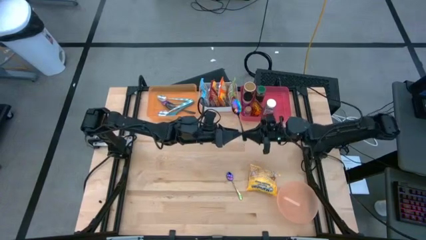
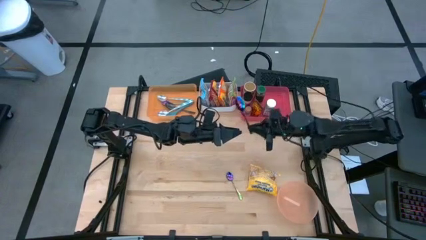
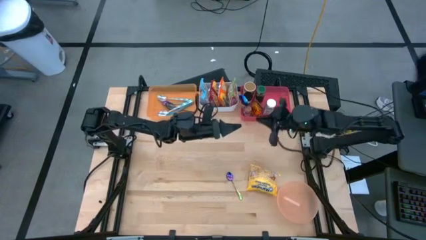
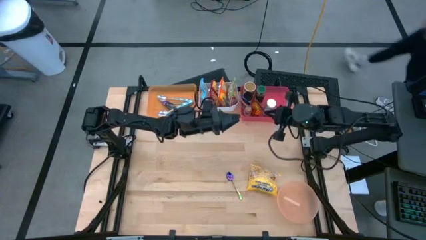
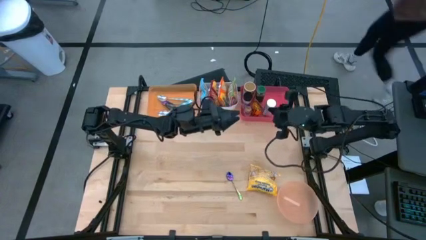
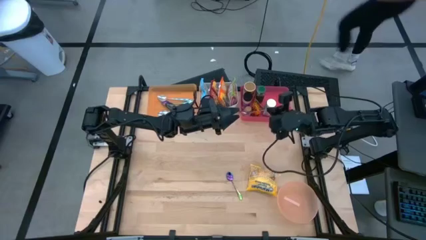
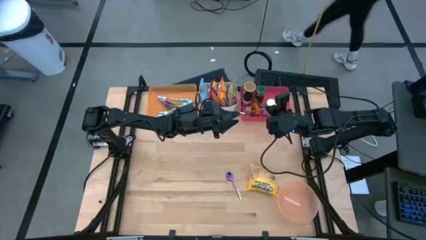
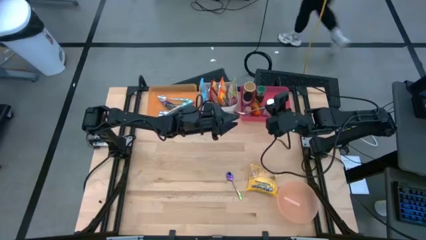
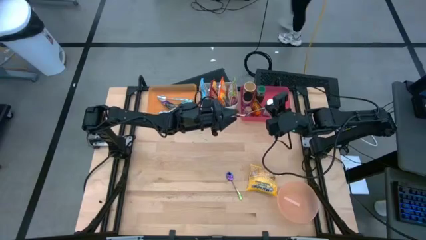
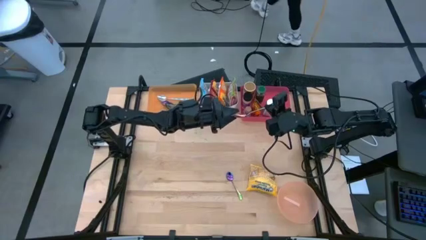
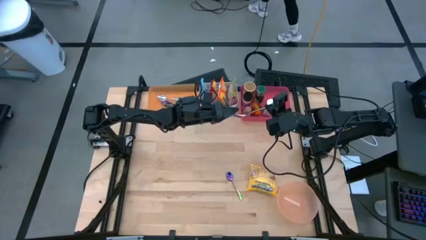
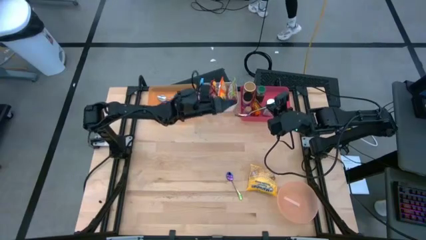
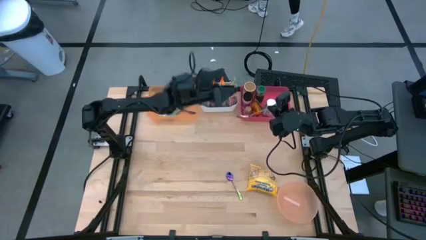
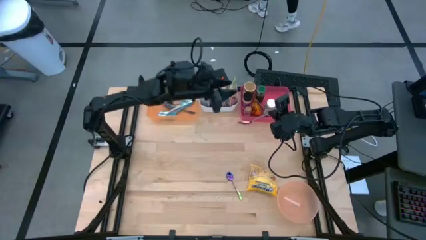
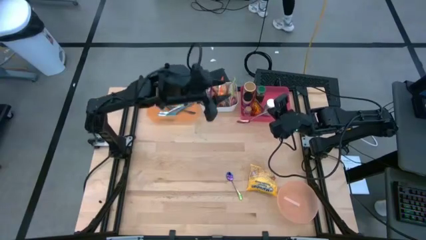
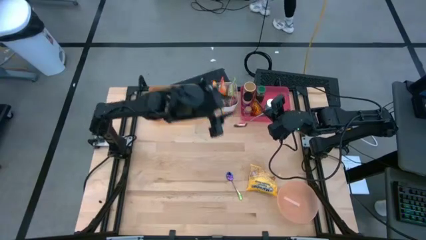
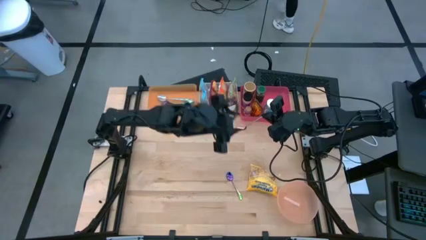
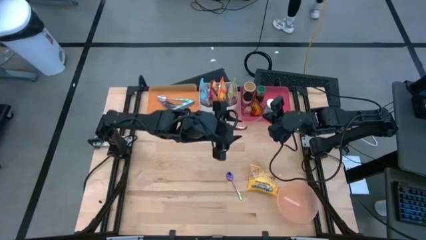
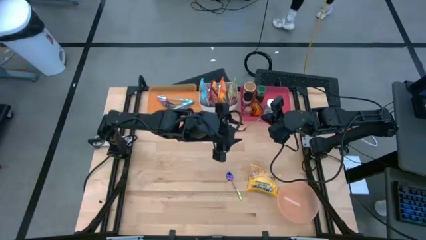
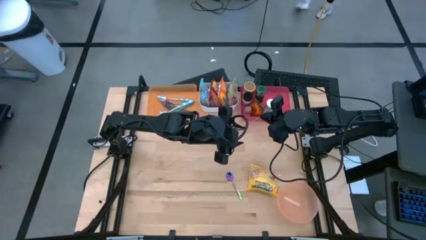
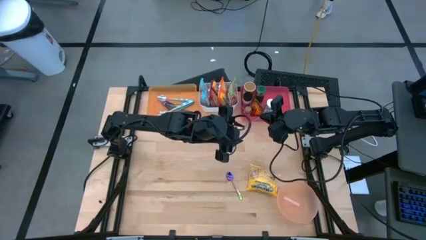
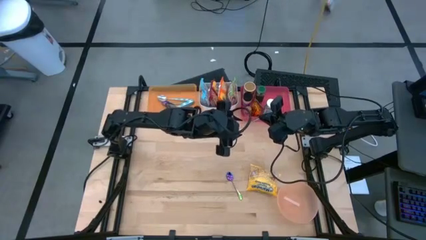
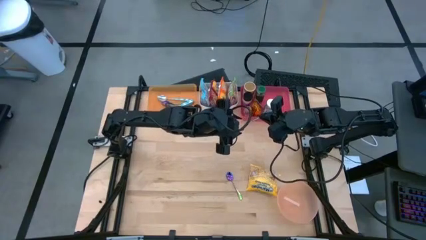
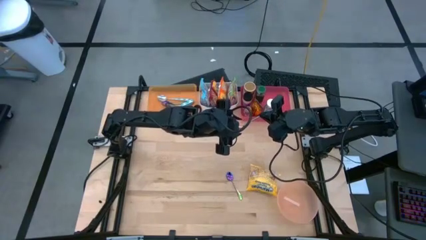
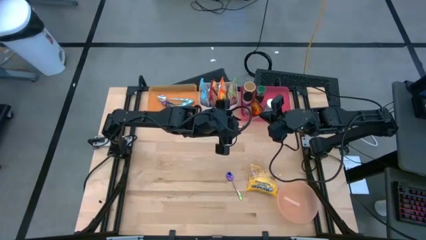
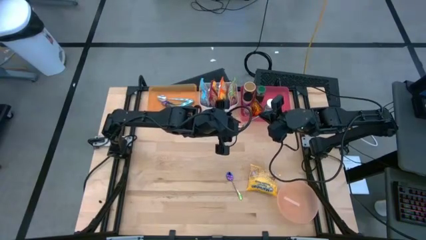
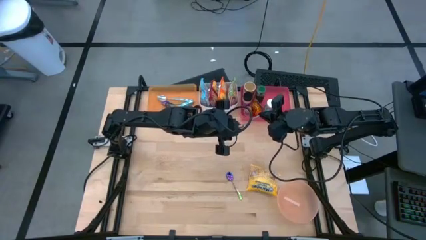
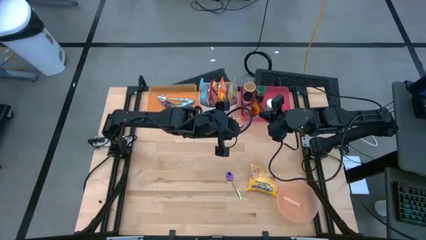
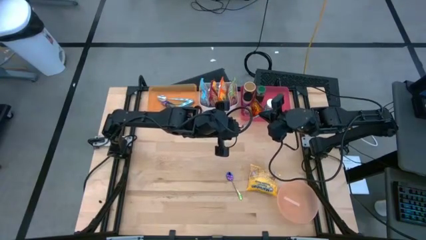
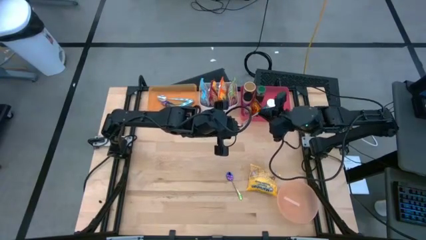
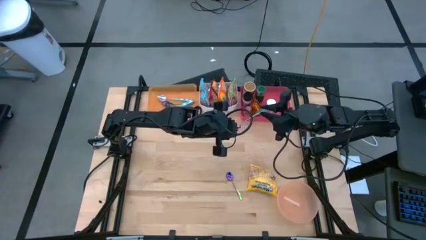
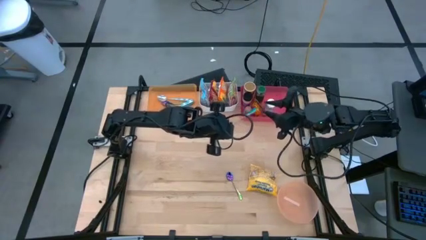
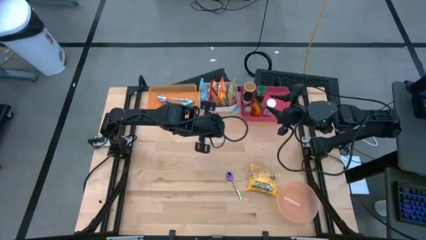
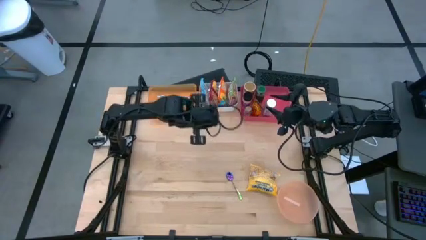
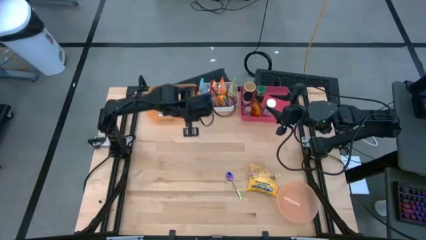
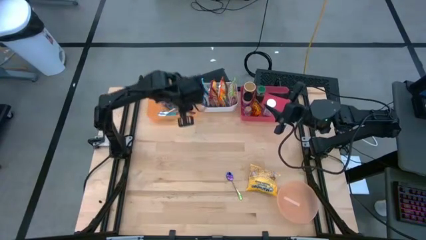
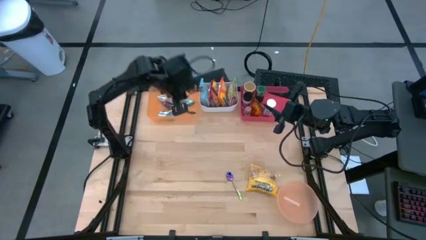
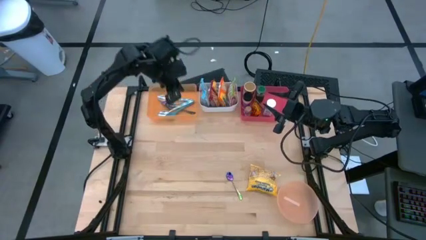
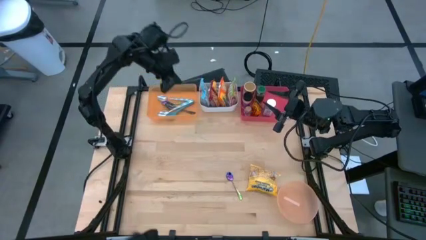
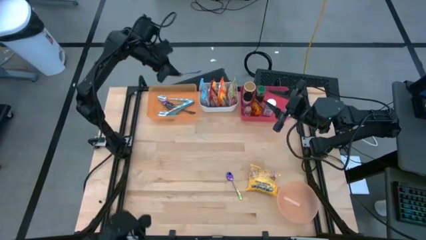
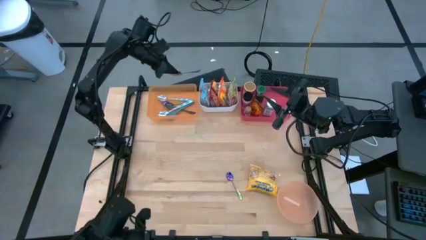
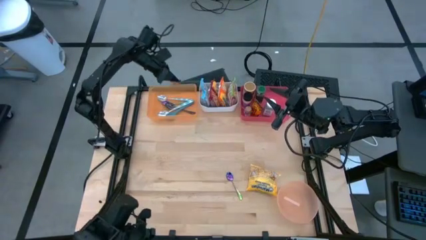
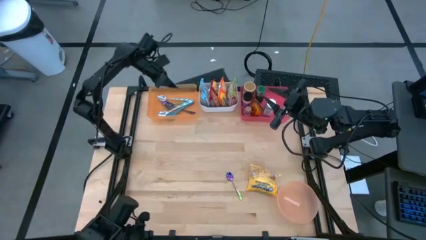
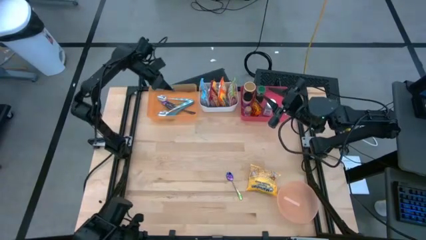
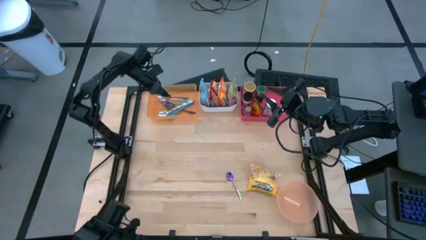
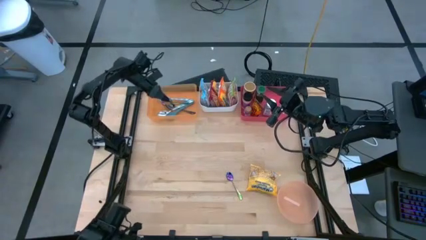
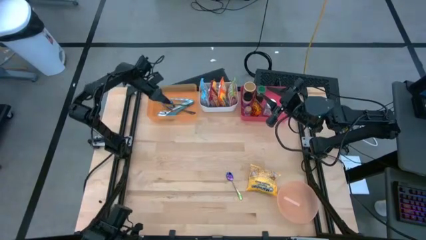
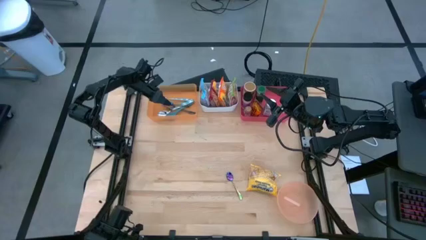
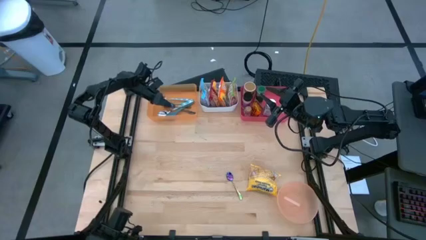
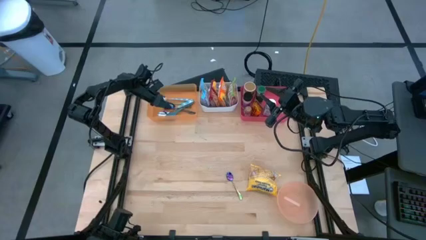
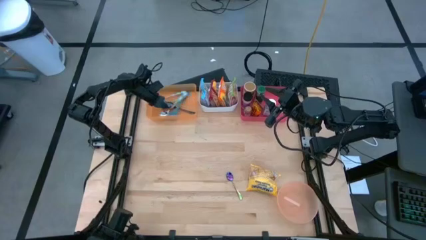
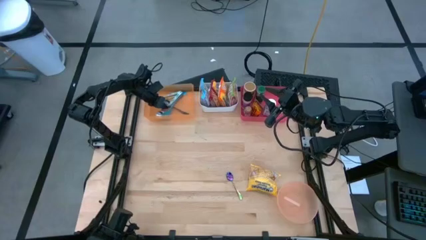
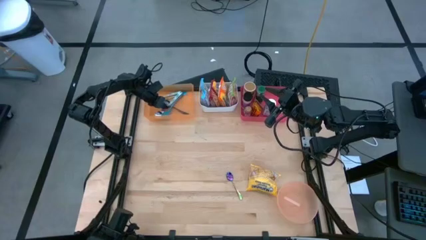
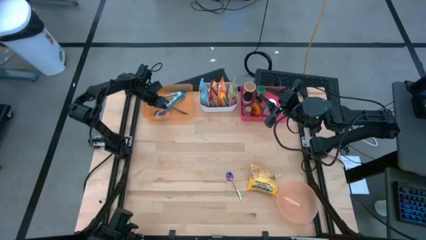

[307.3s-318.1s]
Task: Pick & Place Food Item
Put the left violet and green spoon into the orange bin
